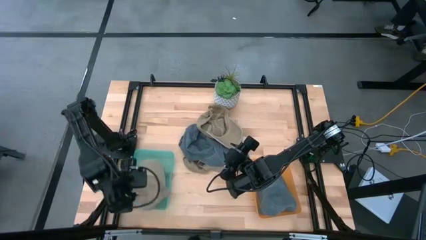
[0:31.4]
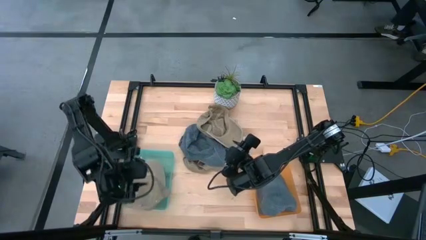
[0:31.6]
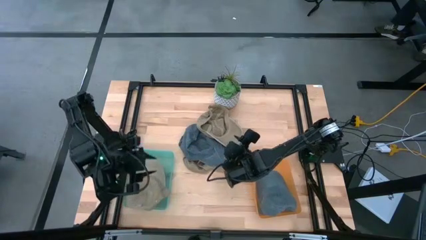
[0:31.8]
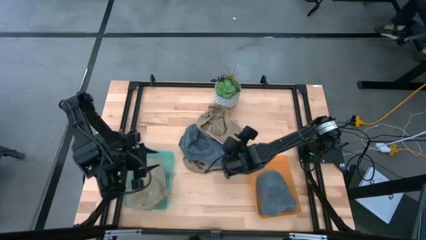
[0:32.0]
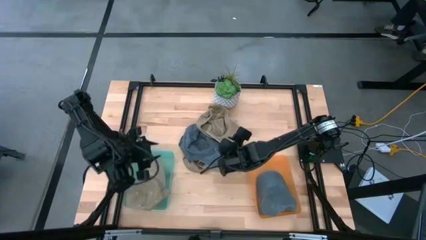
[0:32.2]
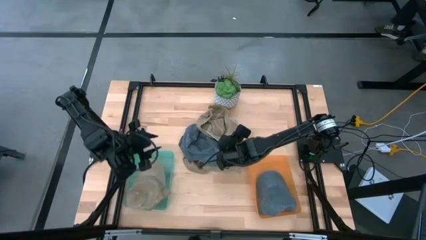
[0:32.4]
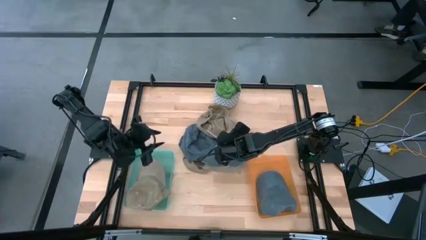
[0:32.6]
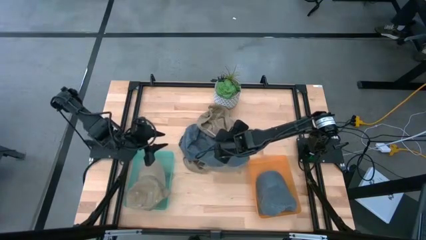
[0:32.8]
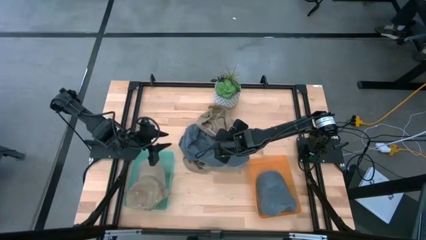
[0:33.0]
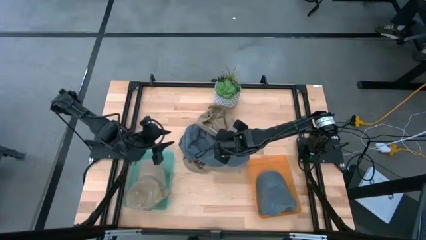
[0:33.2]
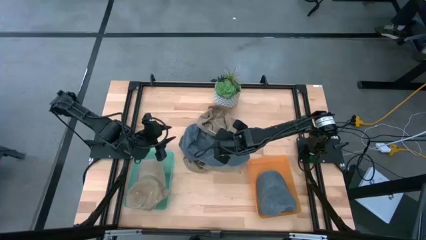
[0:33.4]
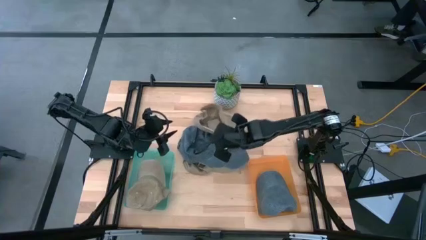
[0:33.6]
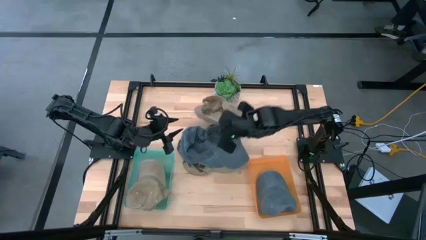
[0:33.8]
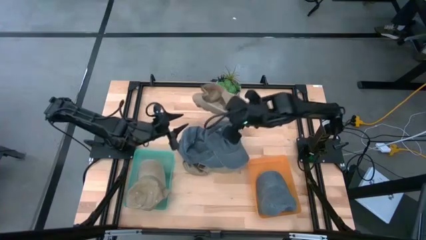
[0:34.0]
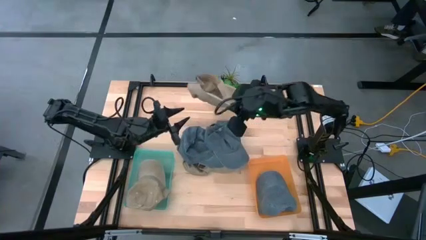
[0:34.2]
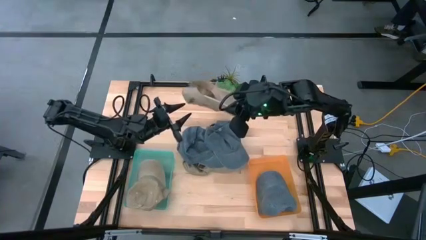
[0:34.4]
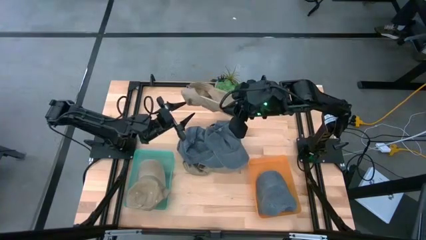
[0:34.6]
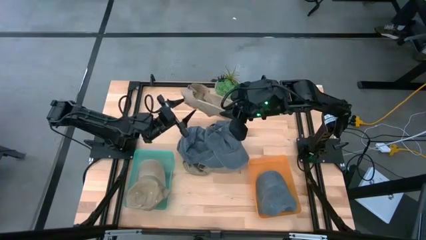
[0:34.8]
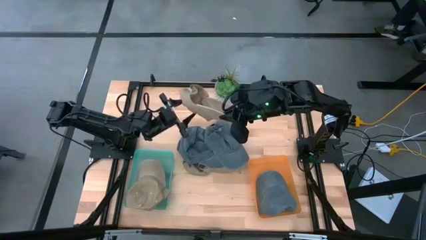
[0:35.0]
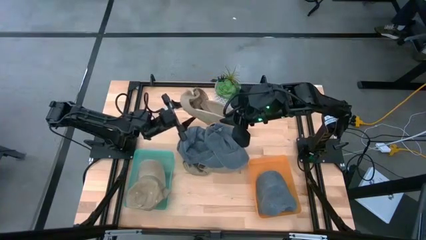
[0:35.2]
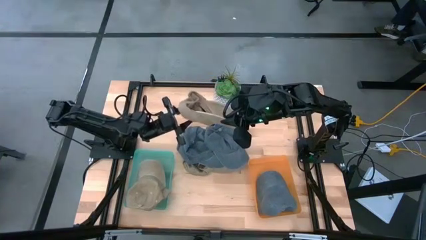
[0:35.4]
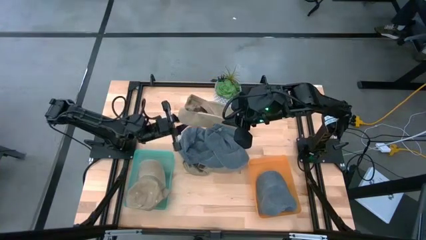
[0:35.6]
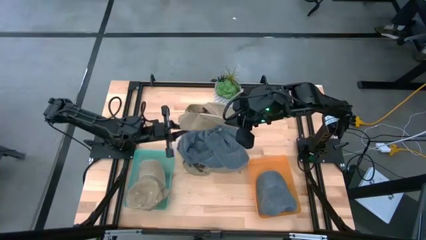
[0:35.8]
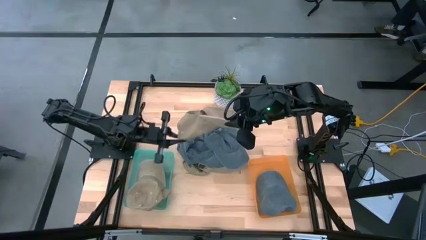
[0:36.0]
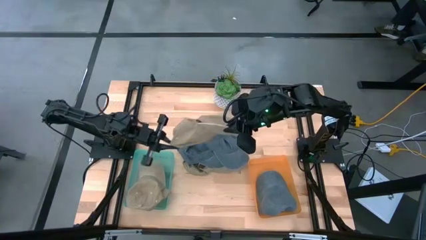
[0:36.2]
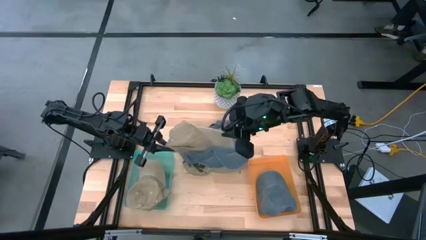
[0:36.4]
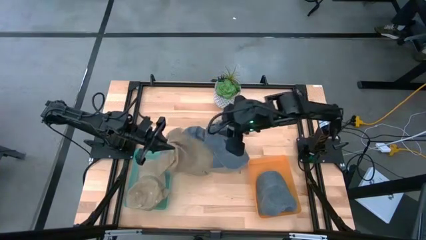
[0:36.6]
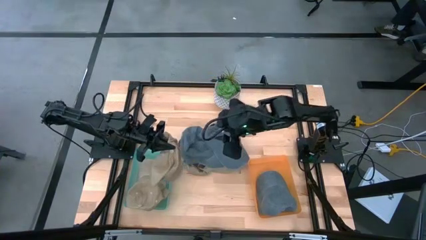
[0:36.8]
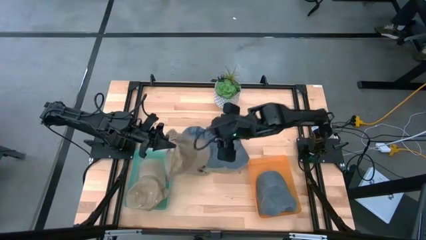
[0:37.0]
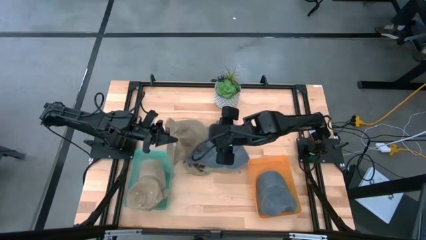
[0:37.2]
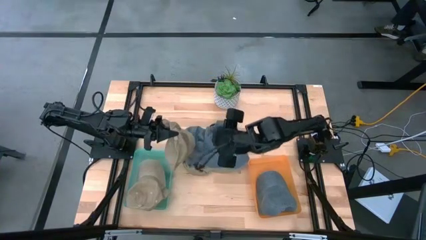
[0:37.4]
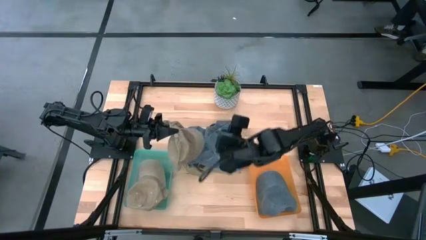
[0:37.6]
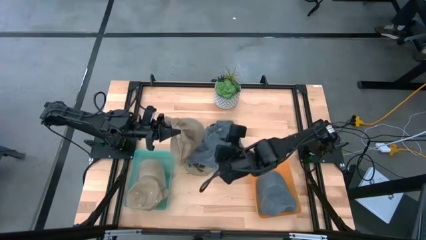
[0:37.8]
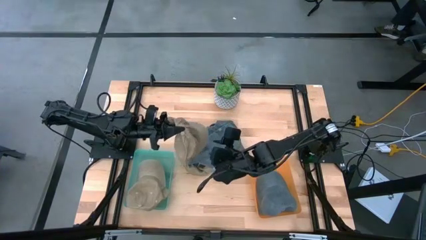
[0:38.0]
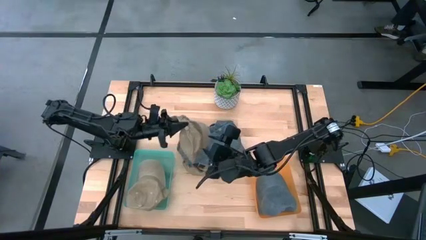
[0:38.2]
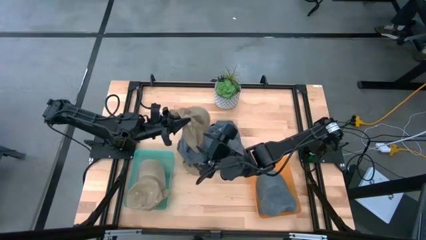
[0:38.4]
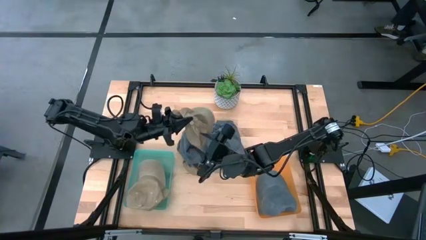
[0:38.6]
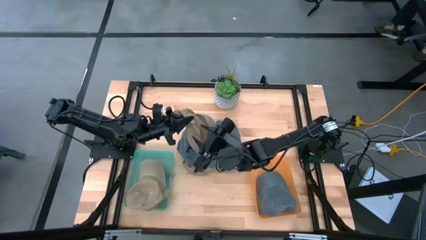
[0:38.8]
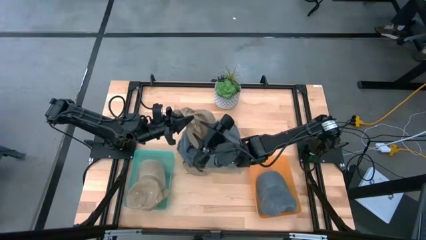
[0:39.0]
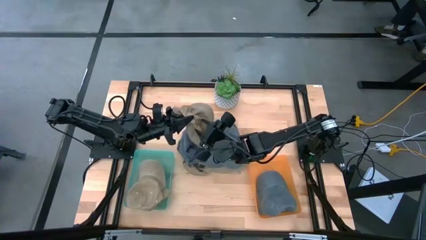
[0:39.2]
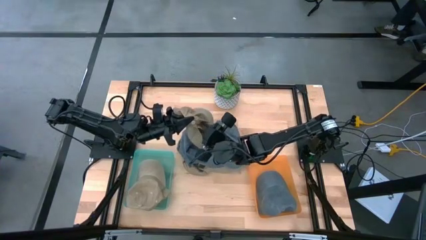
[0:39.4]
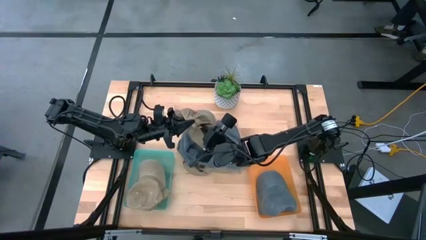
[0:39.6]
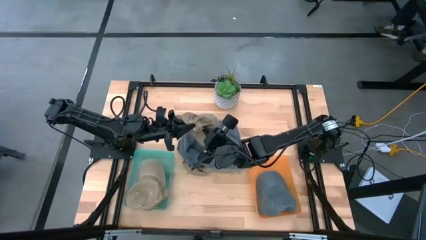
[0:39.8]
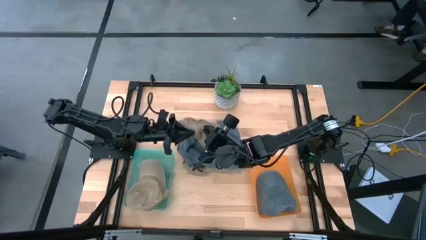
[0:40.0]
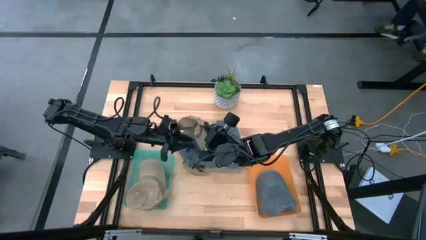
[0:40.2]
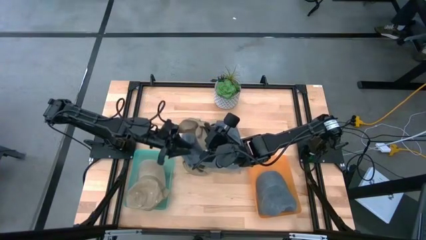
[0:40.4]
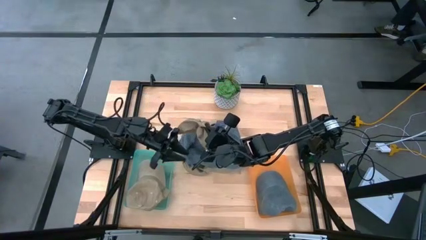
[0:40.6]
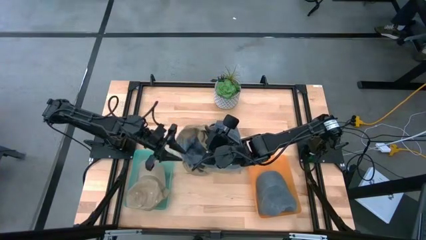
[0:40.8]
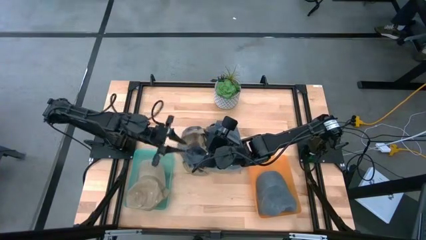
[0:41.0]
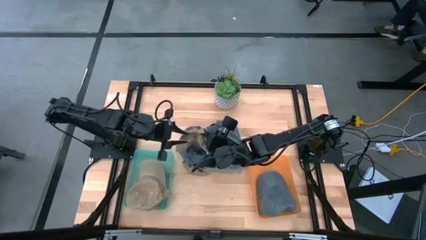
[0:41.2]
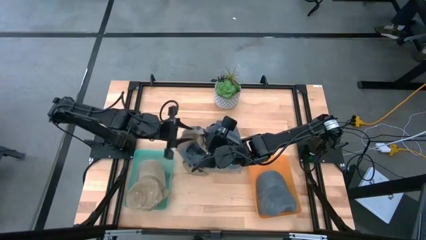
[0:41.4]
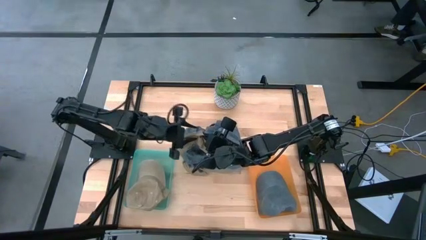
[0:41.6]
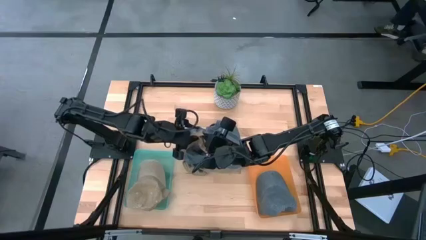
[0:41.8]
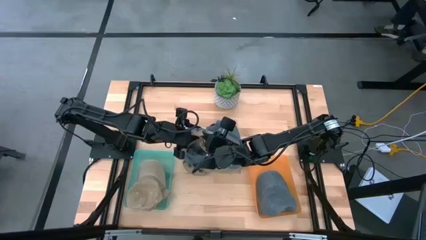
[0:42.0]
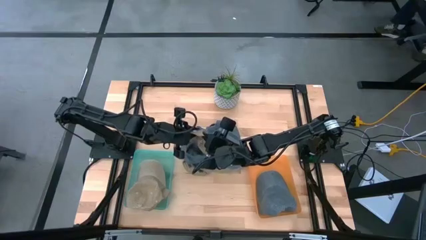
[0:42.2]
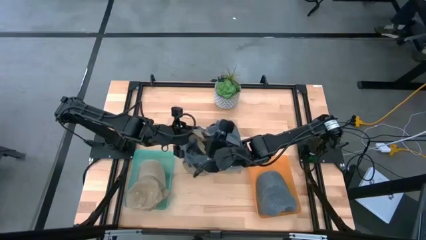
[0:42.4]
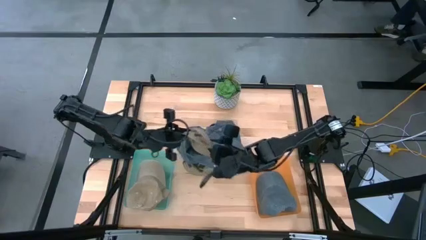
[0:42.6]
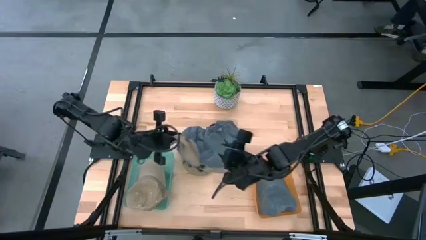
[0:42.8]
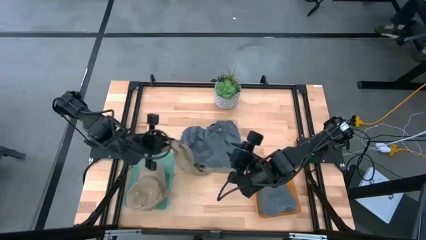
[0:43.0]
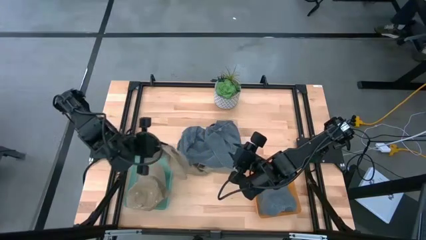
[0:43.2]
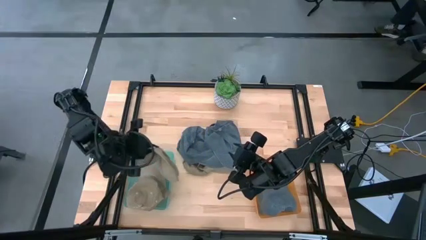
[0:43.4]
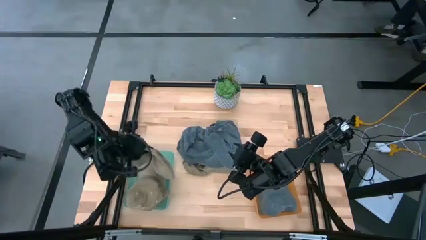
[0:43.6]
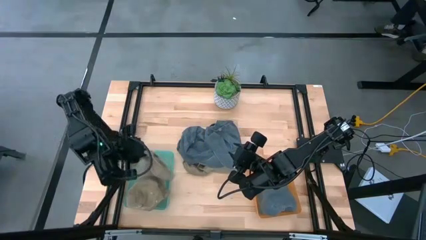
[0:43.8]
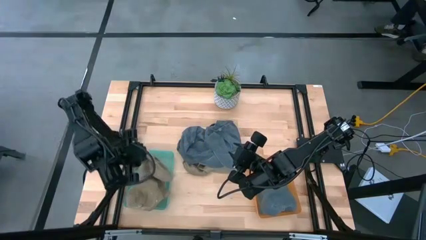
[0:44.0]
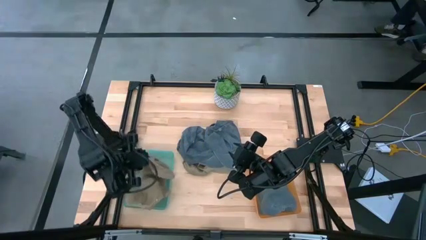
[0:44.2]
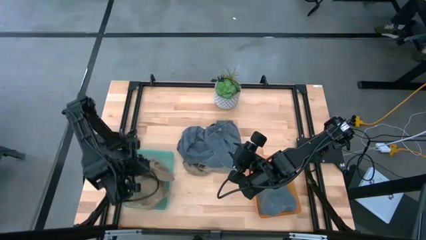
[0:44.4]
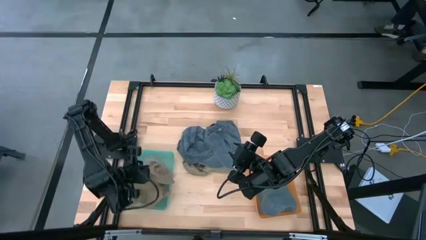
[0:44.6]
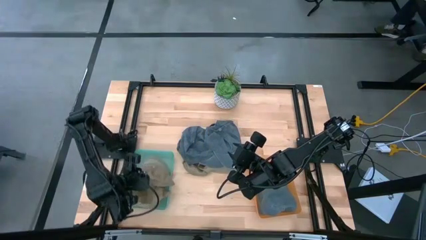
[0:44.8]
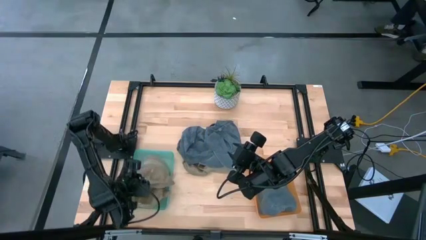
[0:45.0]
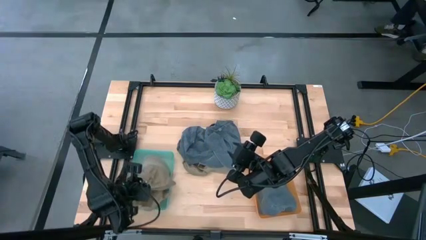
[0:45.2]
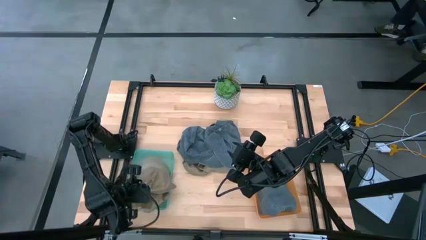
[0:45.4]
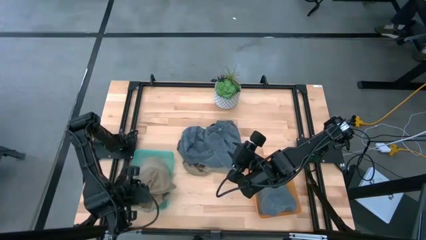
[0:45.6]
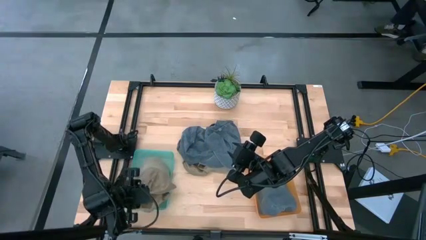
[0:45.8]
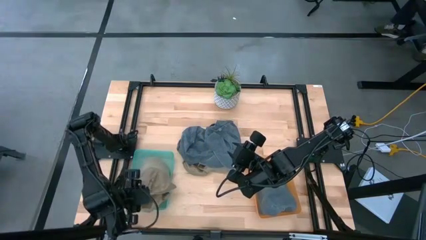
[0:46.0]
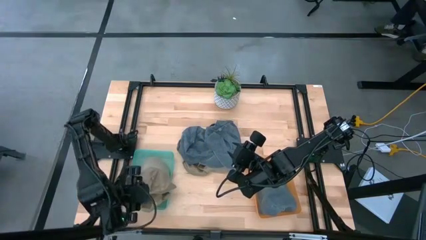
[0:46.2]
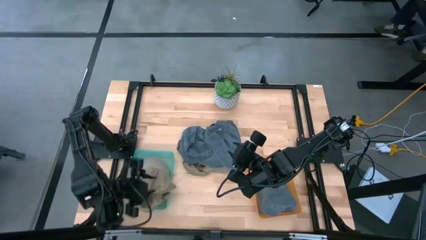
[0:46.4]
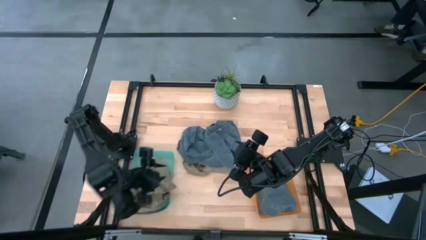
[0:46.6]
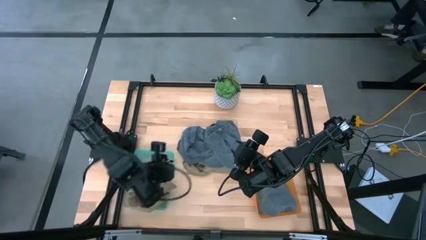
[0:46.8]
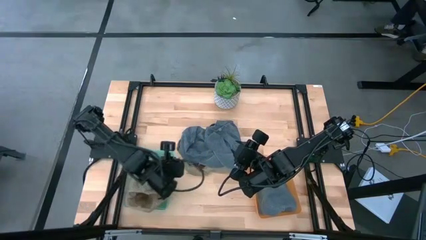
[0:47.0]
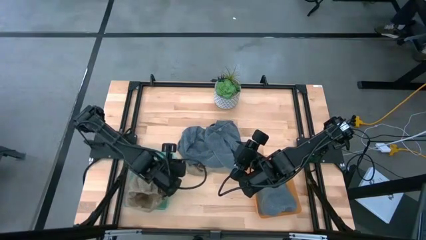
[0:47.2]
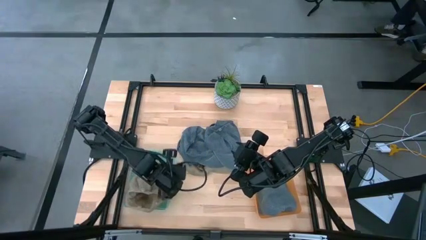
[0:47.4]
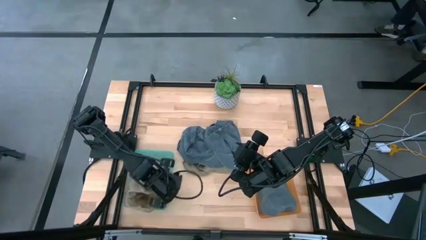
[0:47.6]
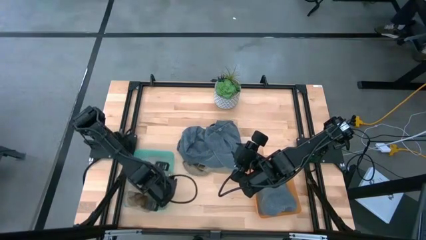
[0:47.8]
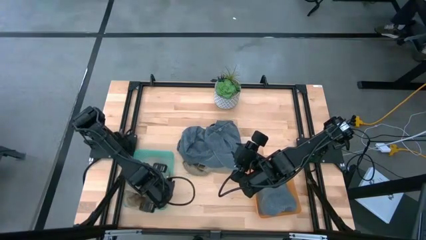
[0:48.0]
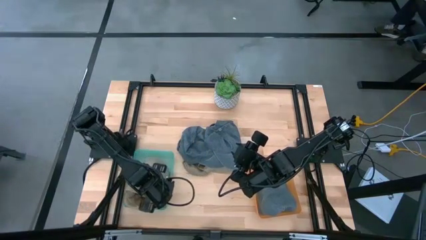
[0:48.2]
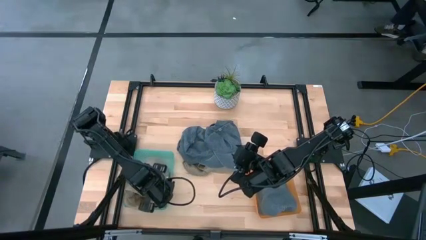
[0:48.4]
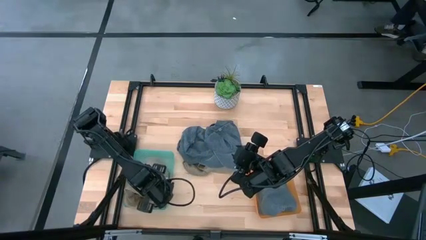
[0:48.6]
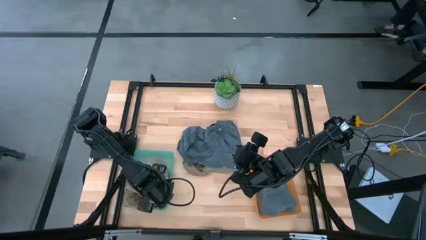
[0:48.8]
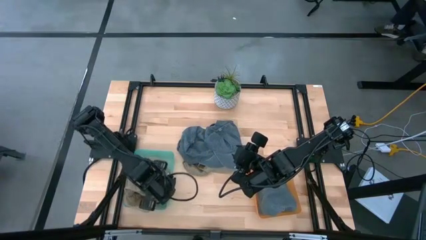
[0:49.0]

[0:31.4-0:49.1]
Task: Pick & Place hat
Put the brown cap into the blue bin
